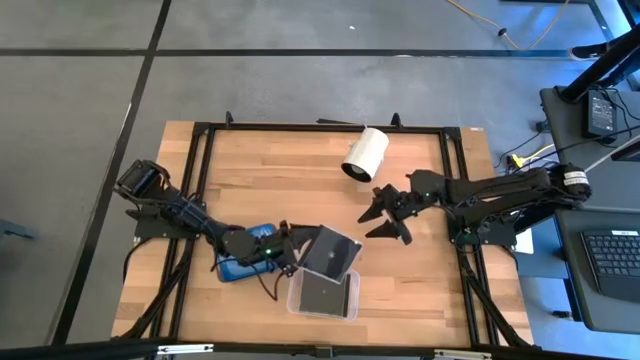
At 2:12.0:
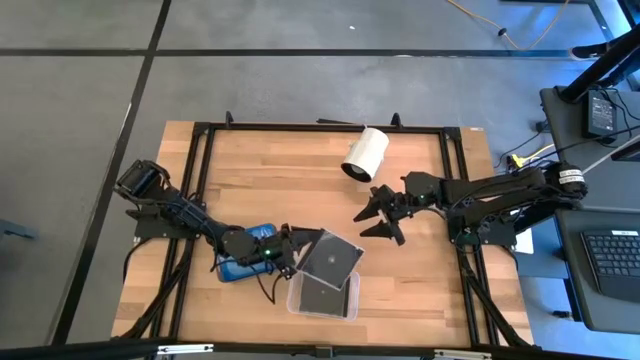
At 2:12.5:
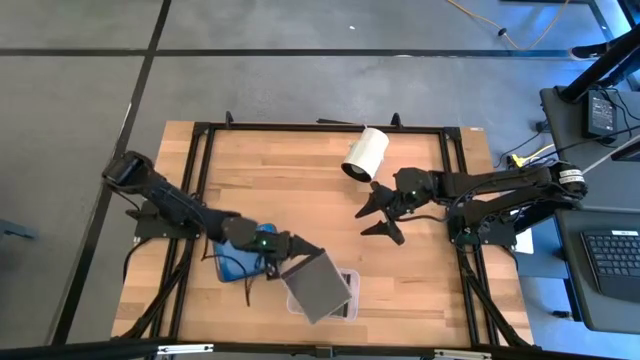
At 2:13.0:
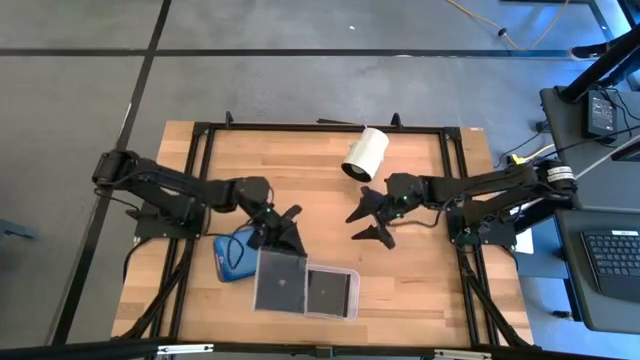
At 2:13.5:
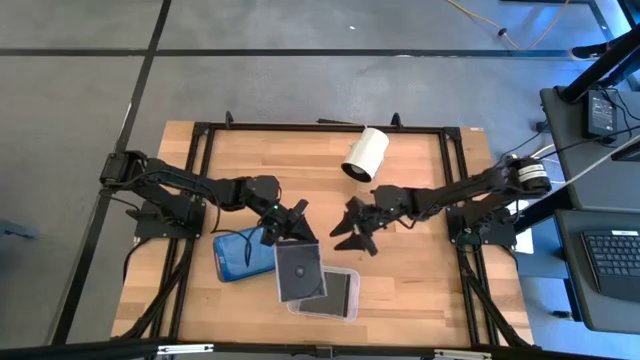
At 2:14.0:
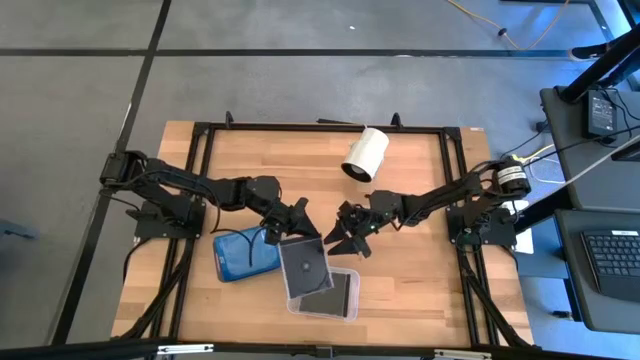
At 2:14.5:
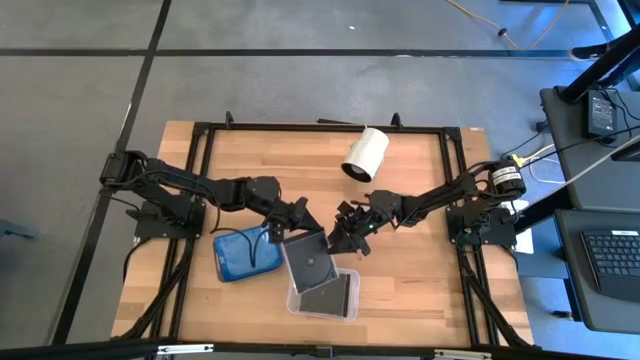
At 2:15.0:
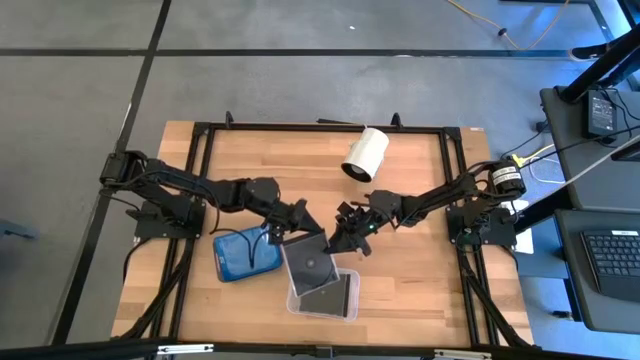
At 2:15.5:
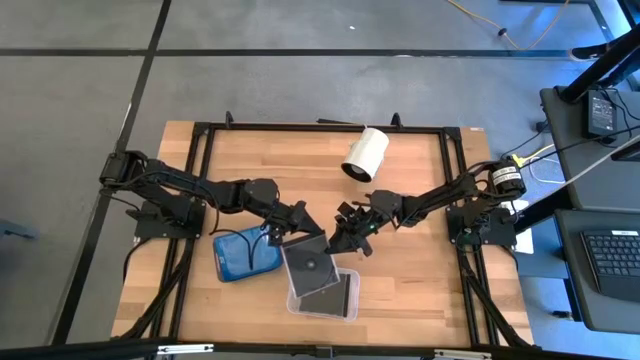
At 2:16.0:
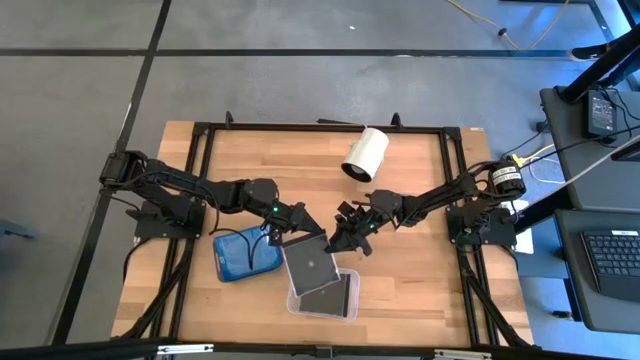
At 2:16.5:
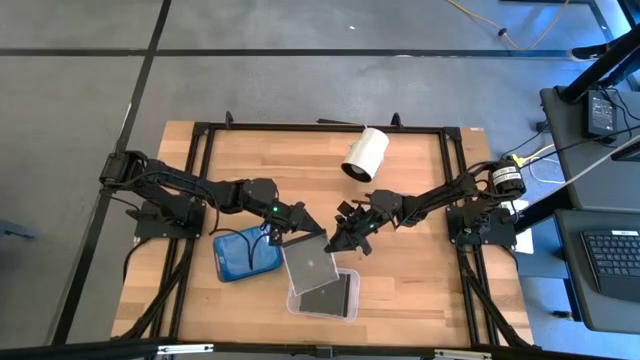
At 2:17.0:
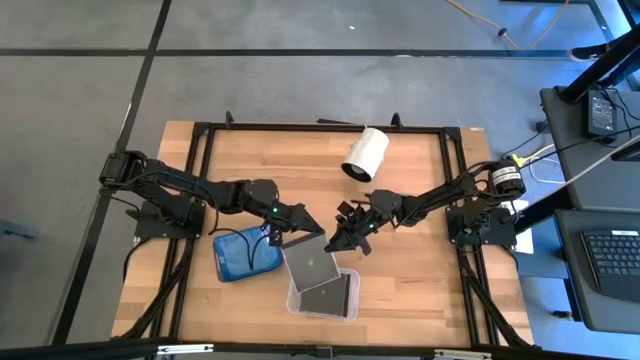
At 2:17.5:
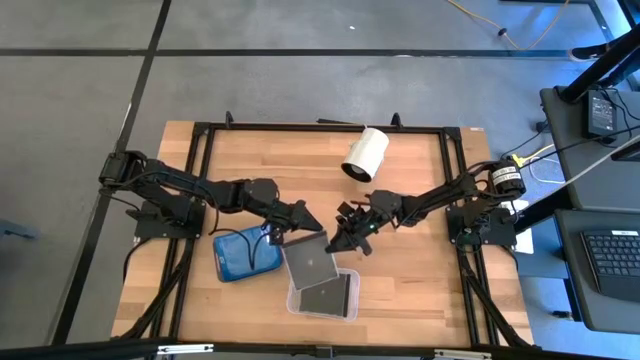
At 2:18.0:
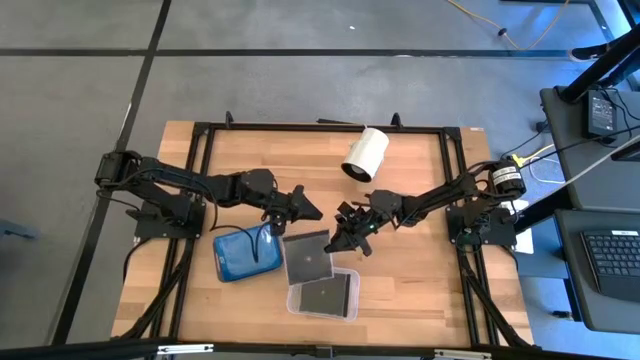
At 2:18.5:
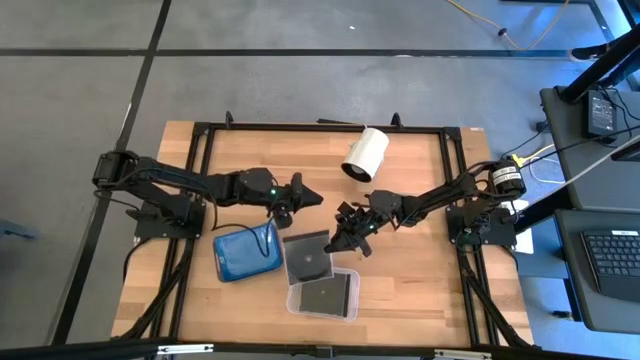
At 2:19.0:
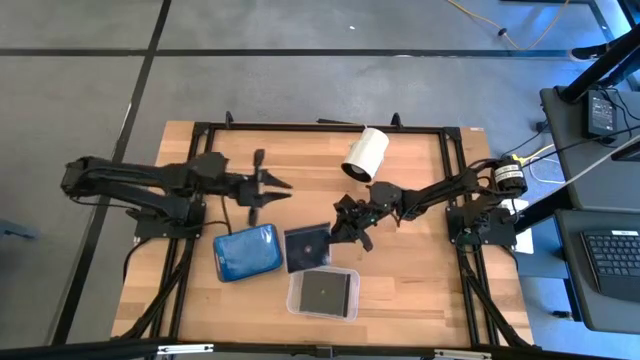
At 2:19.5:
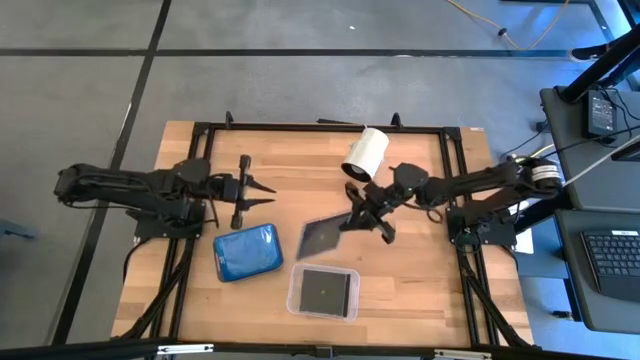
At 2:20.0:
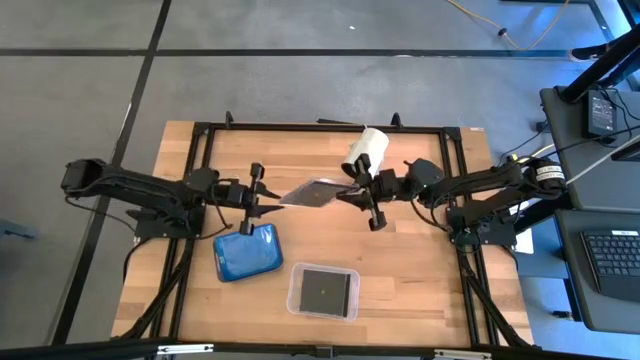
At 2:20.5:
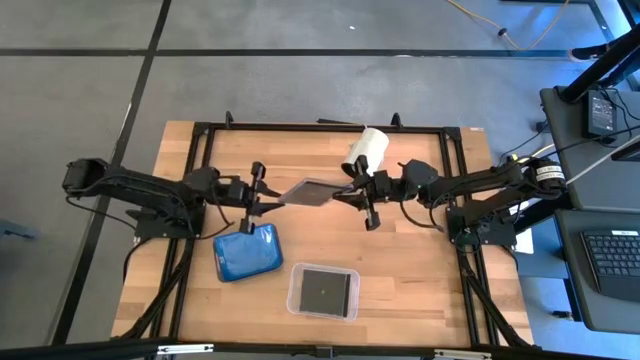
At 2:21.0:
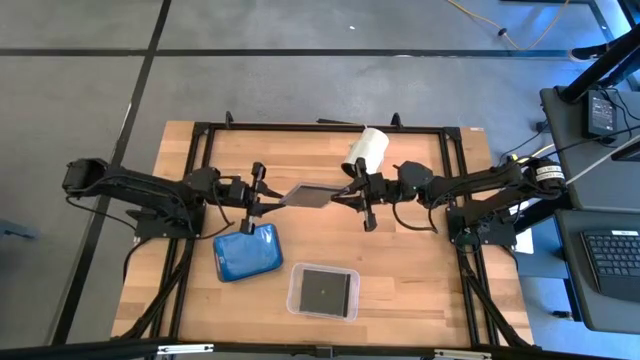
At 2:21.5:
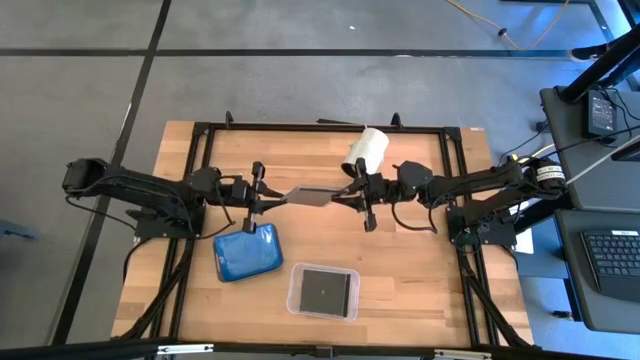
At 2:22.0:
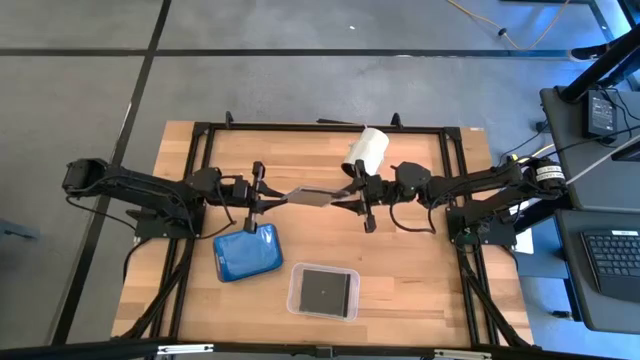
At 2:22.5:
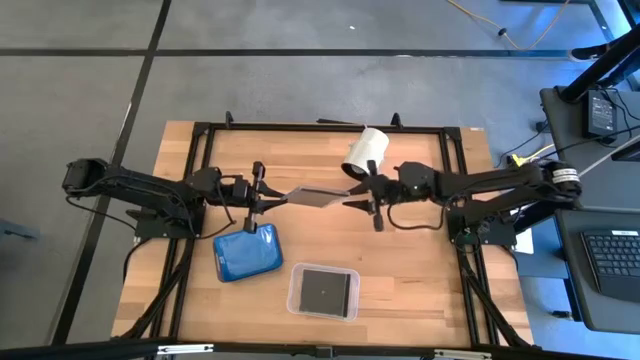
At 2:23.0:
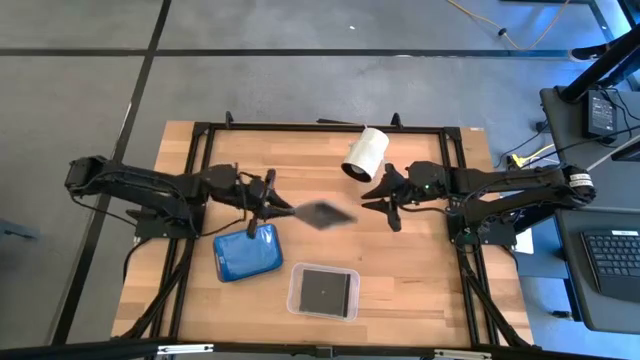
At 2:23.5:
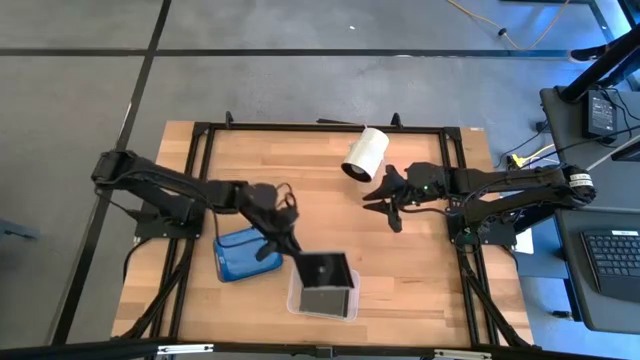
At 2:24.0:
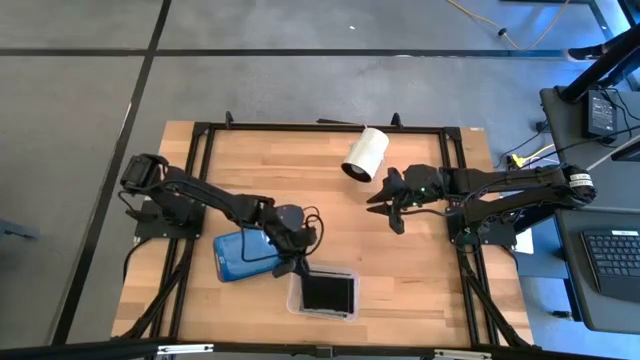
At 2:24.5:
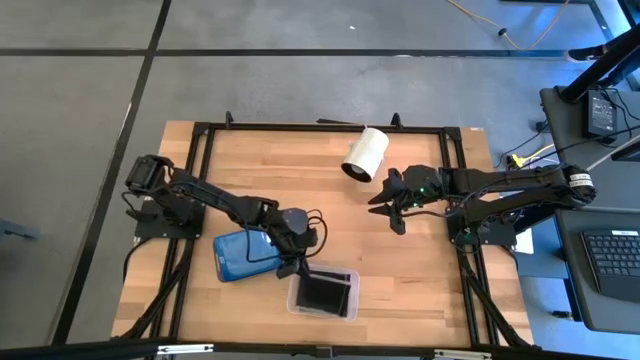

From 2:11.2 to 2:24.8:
Task: Pick & place jewel cases by type
Put the black CD case into the transparent bin

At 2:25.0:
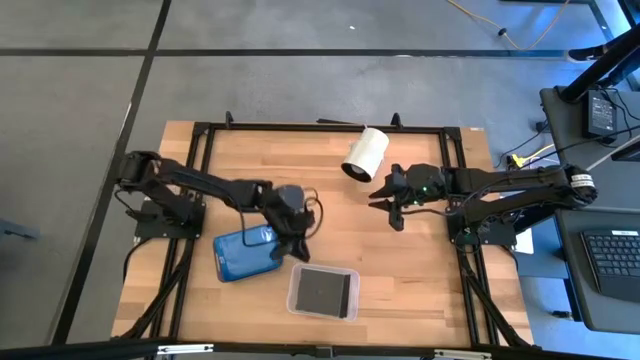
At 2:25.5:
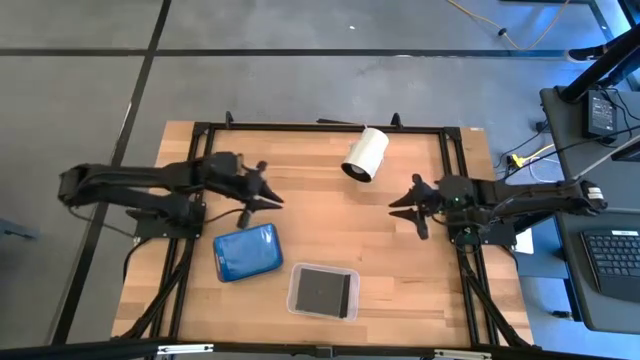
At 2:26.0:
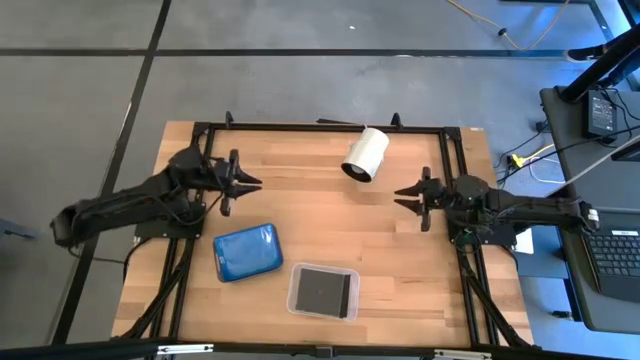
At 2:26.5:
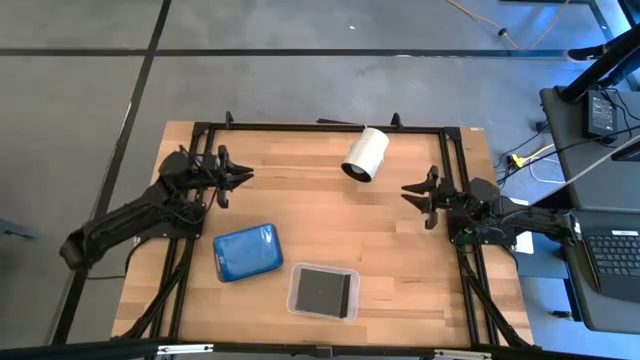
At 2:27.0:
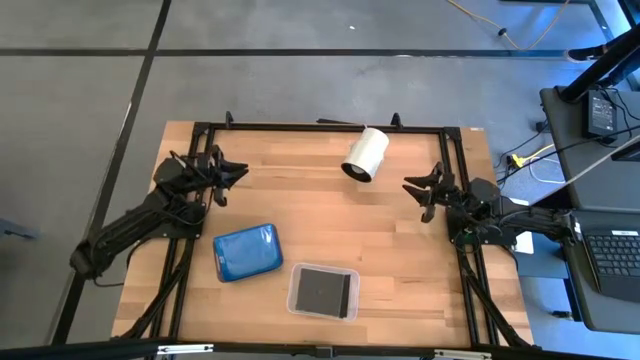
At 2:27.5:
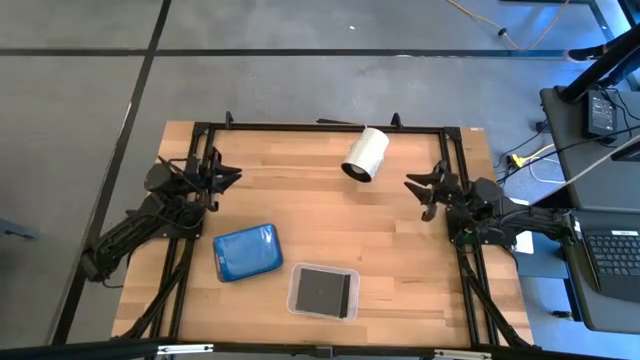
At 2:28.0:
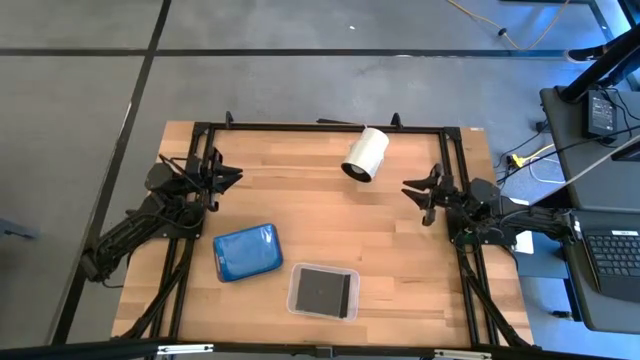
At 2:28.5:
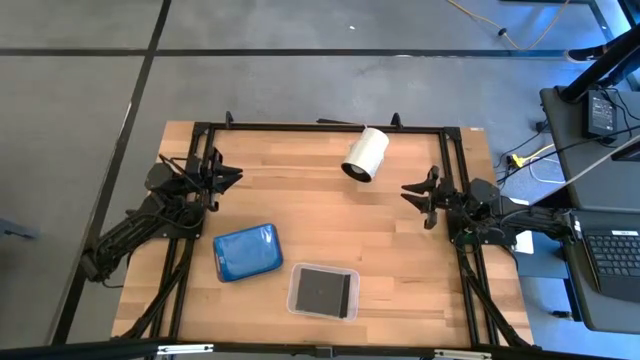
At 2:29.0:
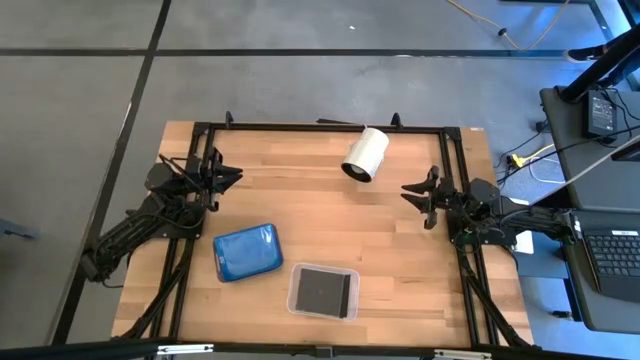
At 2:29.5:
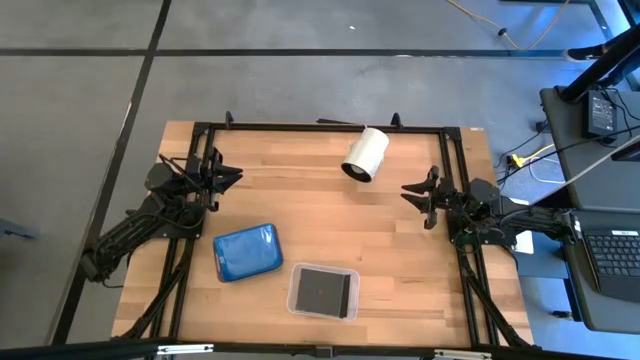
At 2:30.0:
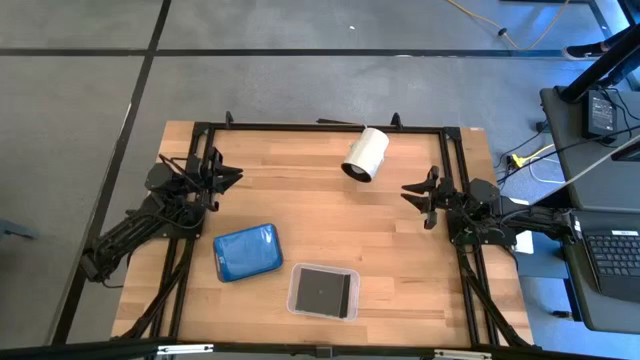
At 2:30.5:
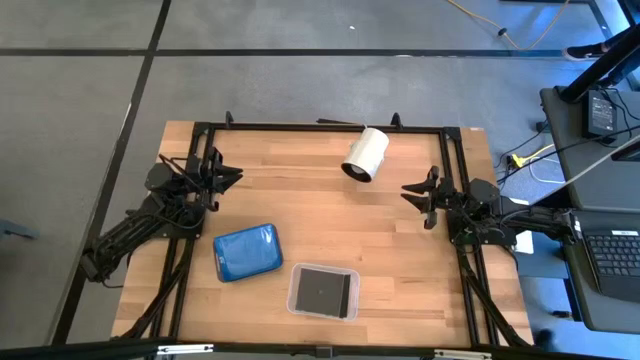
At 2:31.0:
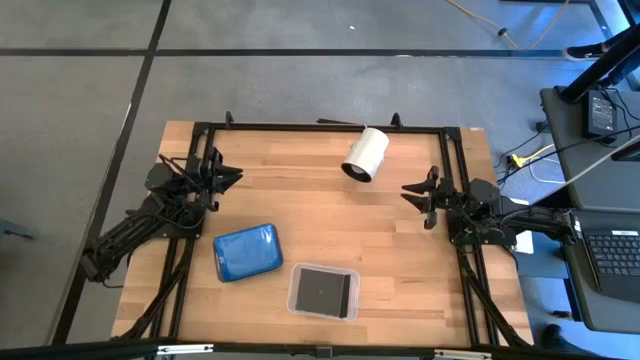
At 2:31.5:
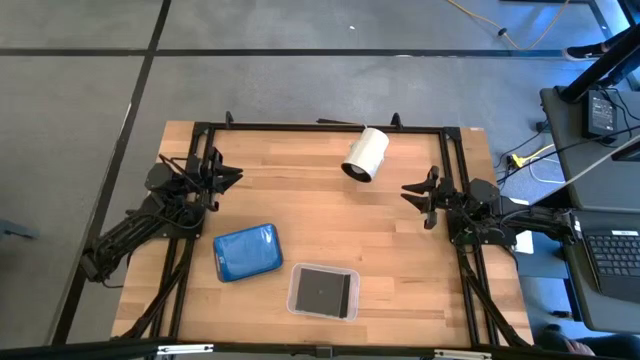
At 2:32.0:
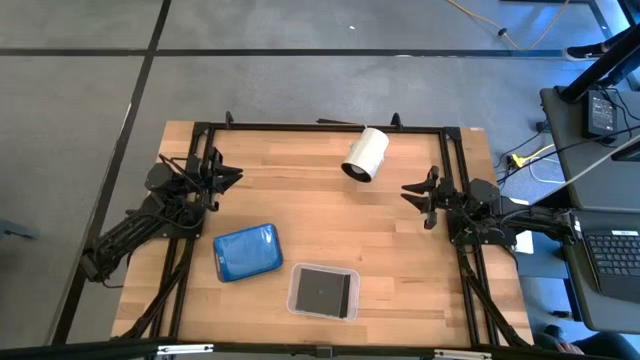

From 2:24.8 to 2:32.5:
Return to home position

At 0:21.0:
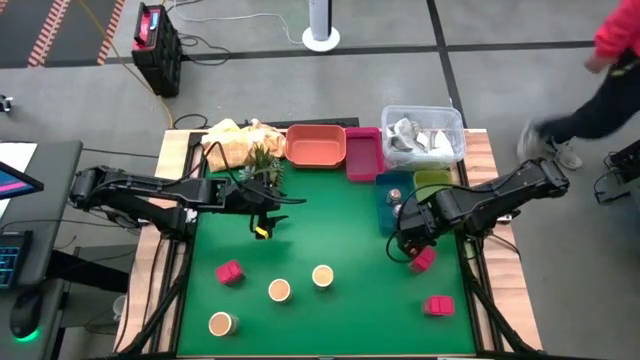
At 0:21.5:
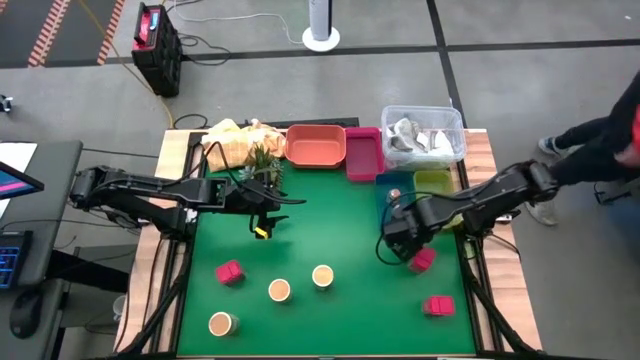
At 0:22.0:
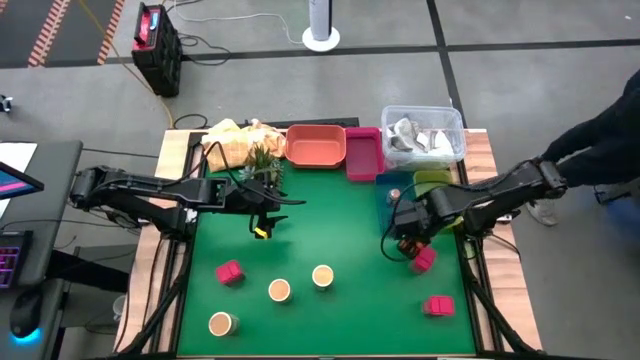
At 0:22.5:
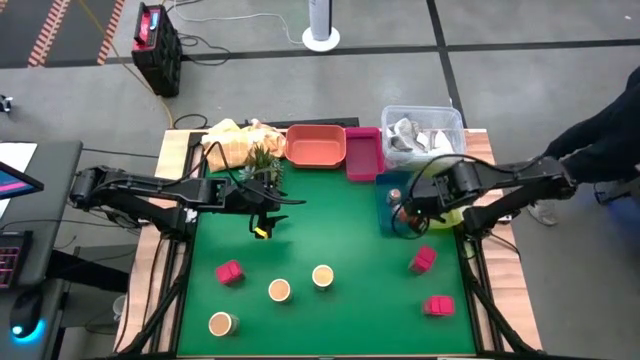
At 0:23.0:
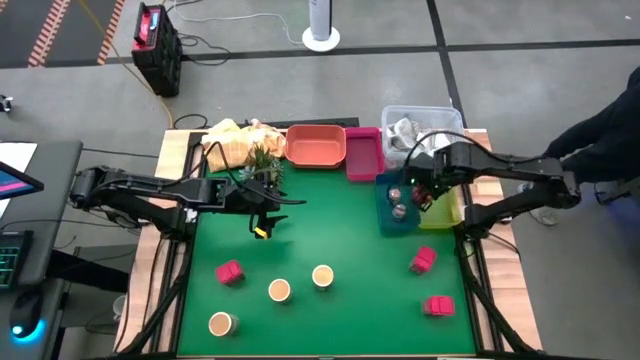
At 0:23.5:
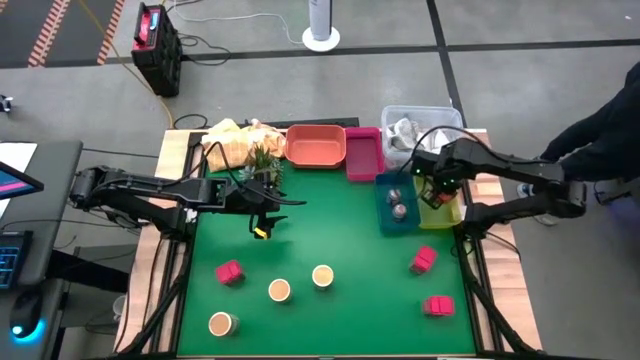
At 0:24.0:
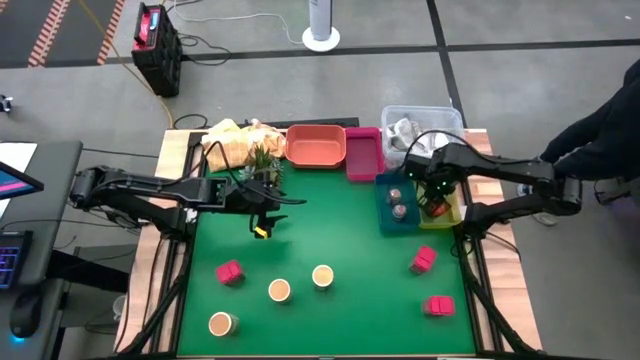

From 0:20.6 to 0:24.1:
Task: Sort spices by type
Put the orange seasoning bag into the yellow bin
